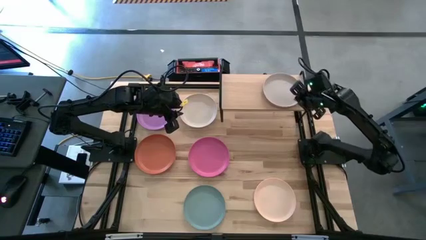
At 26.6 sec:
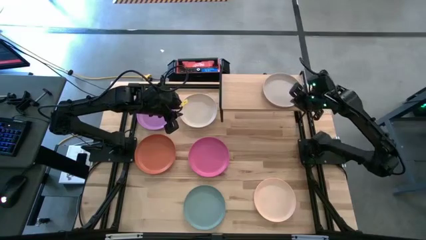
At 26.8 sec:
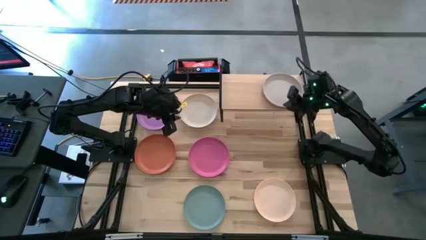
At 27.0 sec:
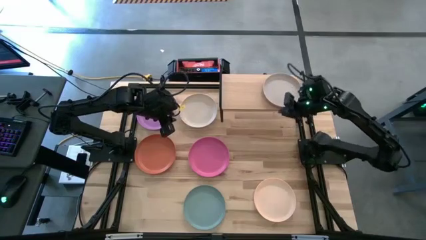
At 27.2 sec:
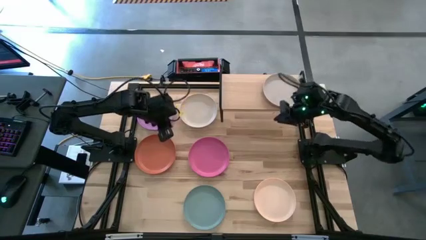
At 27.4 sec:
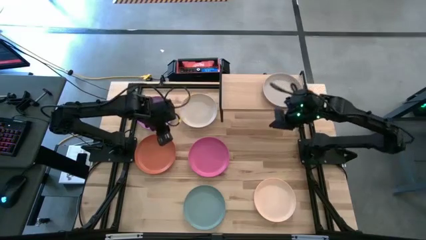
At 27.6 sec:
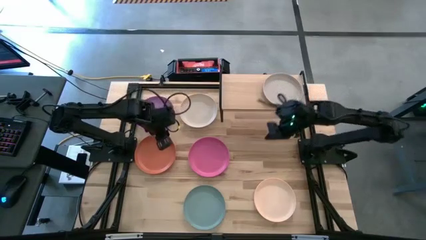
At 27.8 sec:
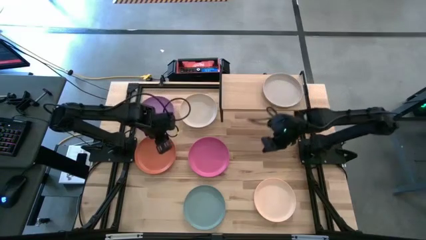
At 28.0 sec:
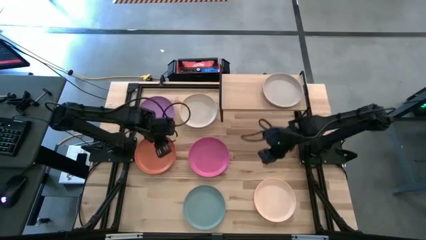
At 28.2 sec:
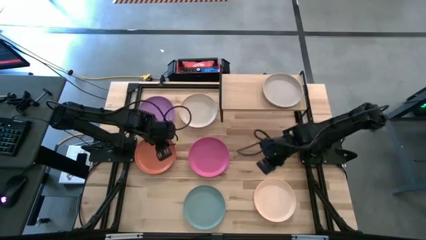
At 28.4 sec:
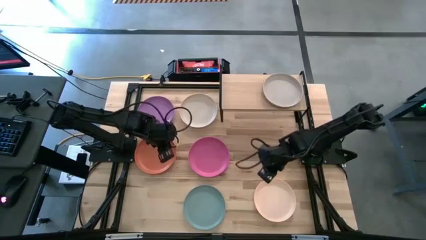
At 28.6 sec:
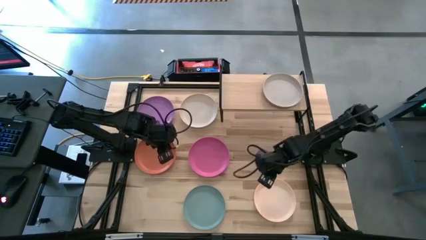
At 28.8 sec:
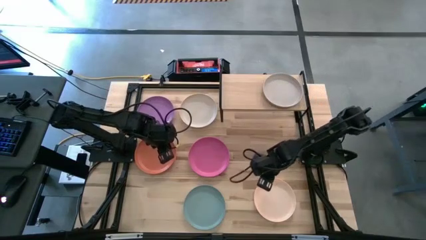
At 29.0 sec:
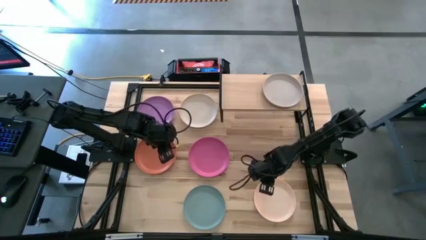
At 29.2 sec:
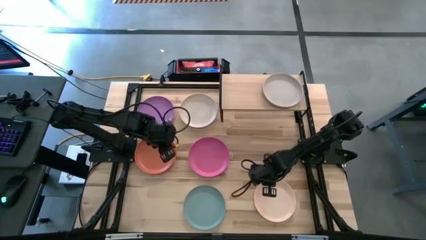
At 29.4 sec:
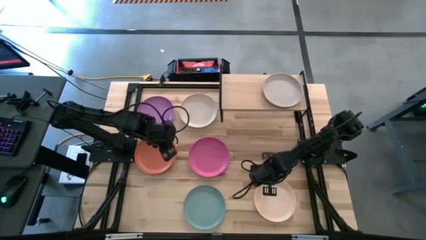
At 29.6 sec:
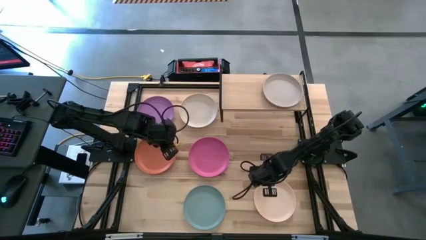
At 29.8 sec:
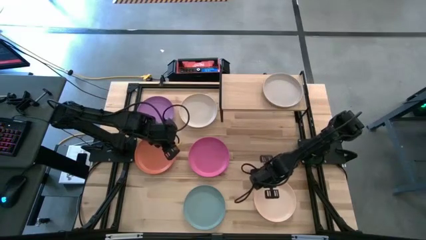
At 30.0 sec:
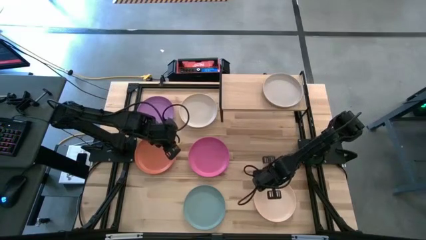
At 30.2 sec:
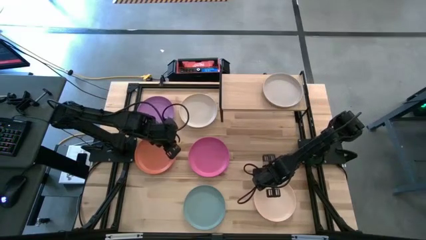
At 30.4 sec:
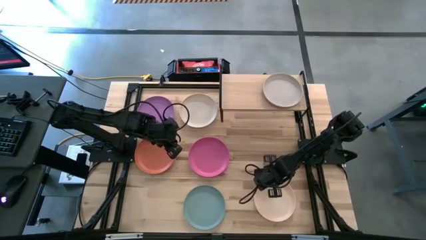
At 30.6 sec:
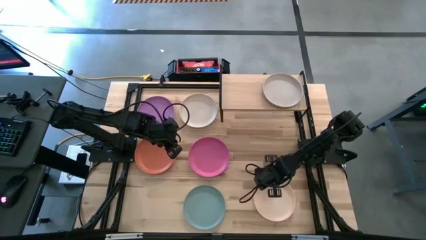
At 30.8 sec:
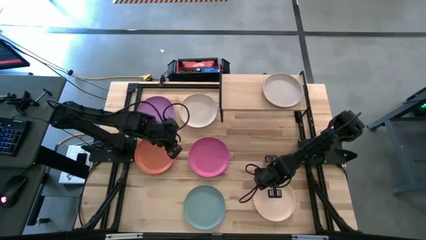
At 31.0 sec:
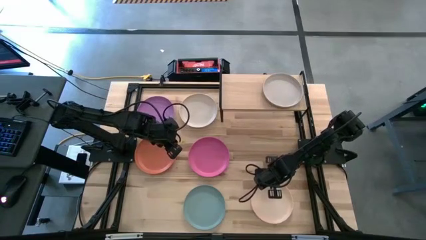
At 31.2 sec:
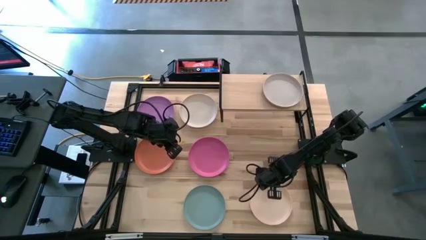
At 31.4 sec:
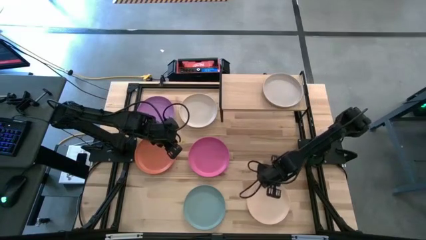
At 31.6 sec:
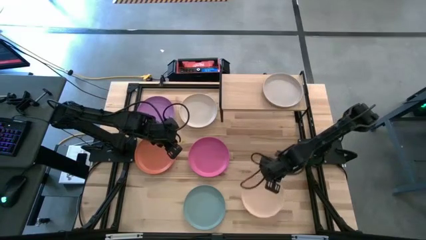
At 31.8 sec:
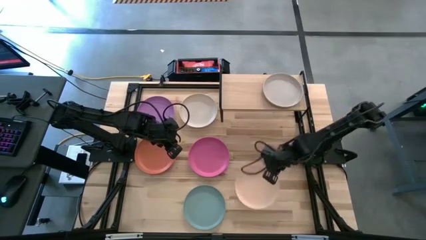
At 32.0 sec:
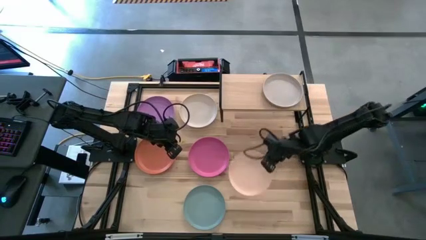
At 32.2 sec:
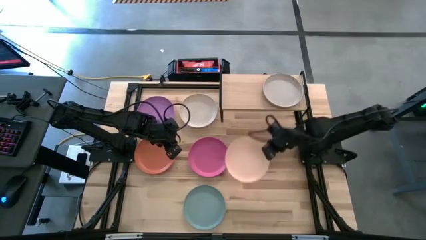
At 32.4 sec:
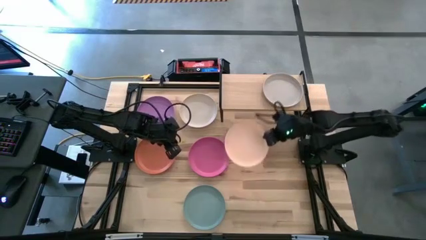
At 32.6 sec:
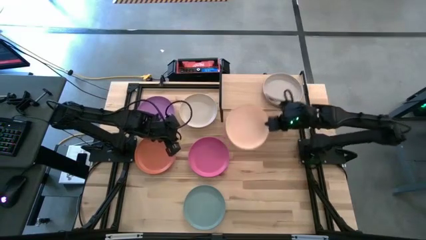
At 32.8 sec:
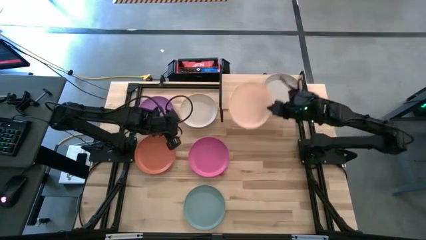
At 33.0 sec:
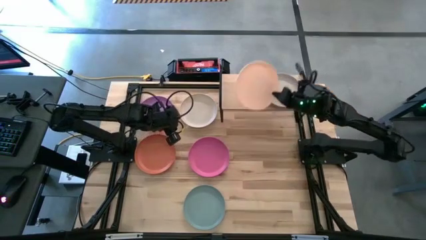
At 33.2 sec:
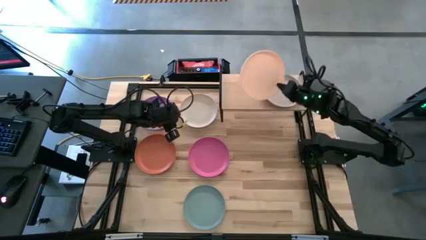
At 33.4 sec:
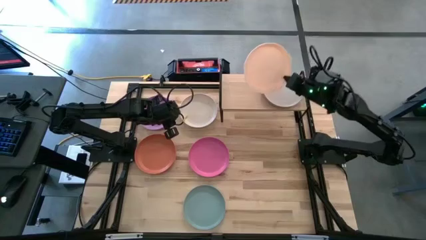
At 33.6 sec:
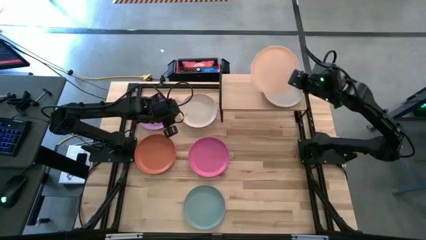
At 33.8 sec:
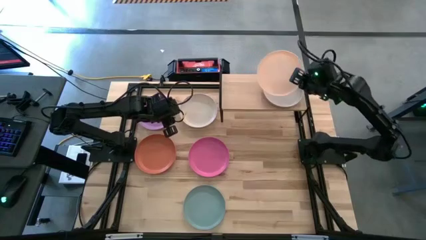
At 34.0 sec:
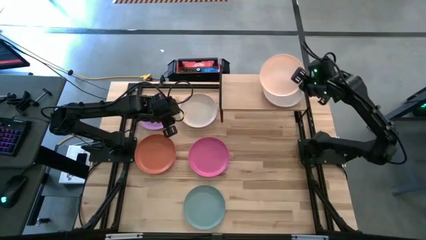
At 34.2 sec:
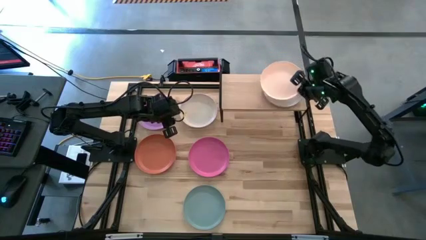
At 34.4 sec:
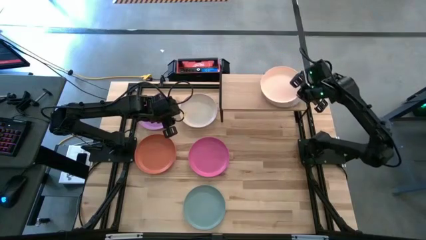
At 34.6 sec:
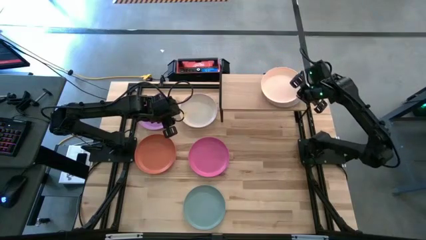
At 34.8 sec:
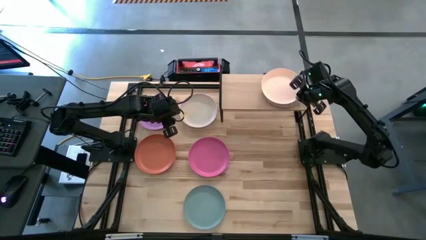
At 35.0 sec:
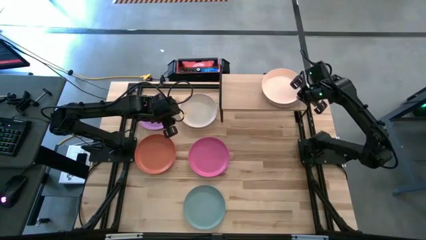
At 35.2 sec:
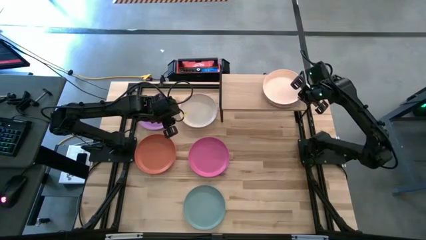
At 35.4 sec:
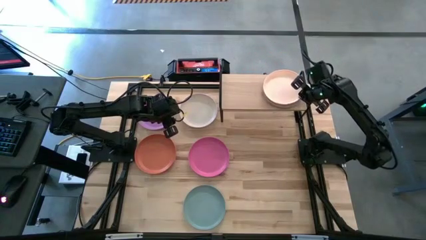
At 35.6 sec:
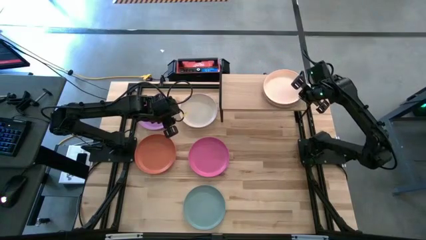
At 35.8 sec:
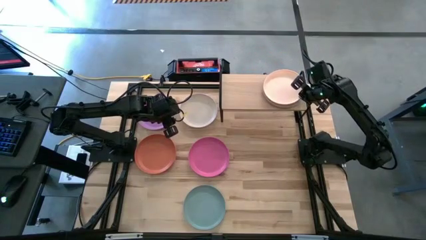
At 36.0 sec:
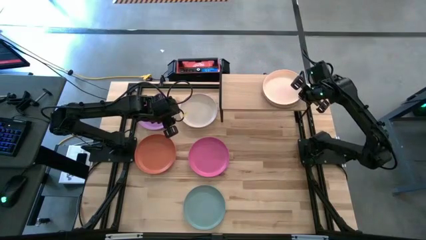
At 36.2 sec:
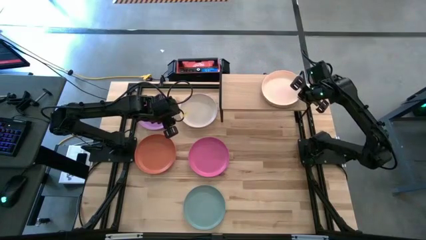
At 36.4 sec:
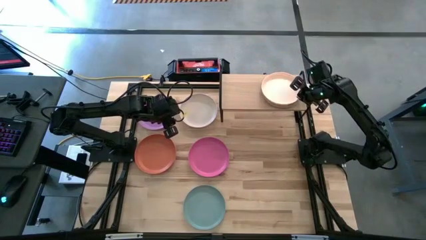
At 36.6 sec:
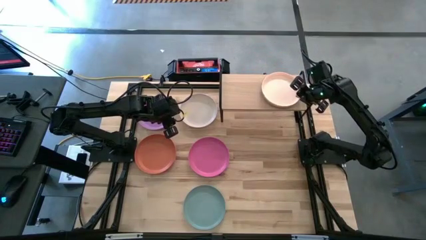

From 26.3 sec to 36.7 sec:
Task: Place and stack plates onto a shelf
Stack the bottom white plate on top of the gray plate on the shelf

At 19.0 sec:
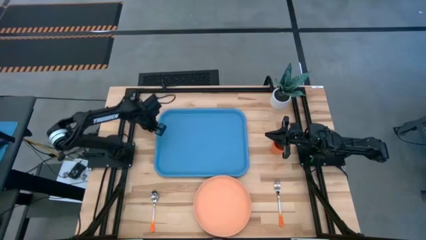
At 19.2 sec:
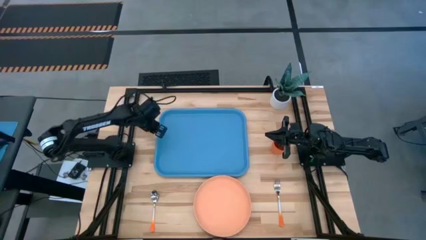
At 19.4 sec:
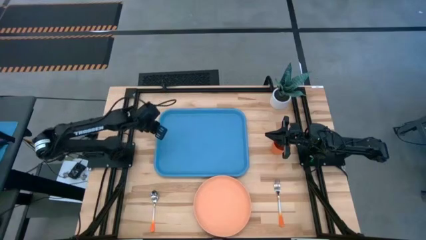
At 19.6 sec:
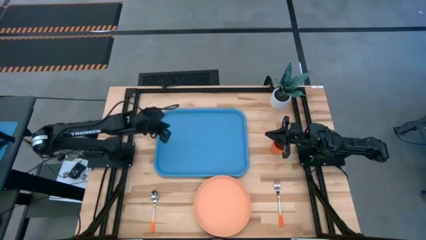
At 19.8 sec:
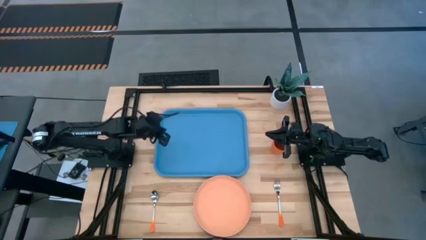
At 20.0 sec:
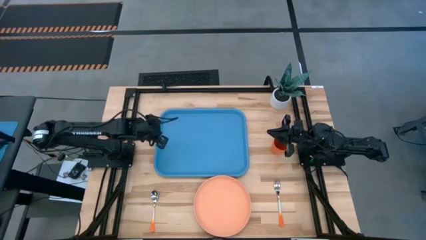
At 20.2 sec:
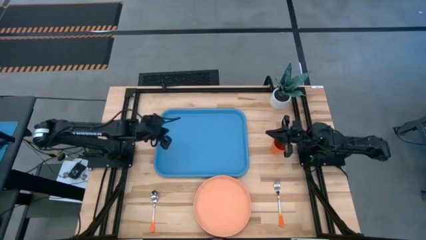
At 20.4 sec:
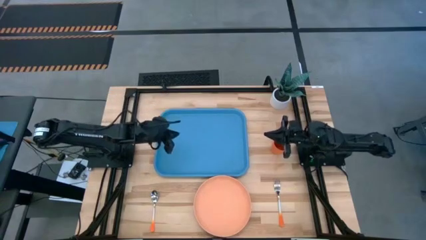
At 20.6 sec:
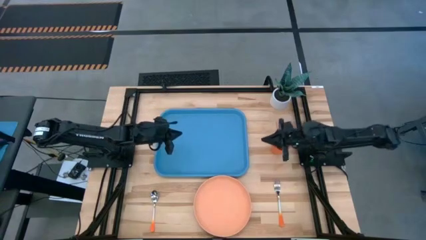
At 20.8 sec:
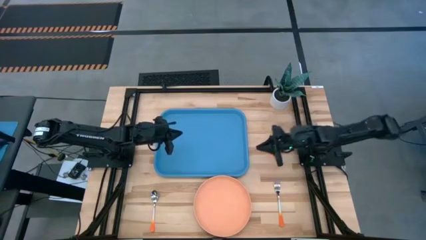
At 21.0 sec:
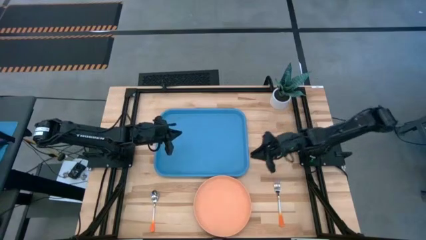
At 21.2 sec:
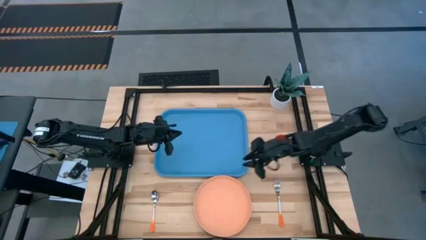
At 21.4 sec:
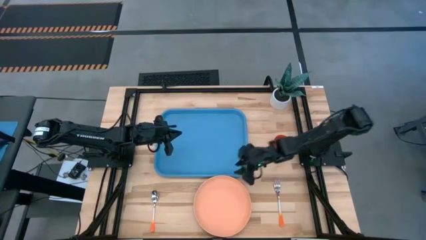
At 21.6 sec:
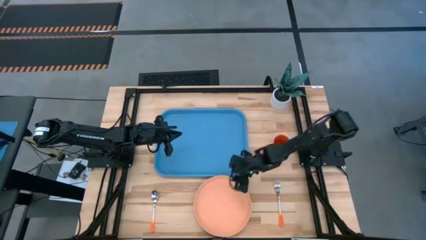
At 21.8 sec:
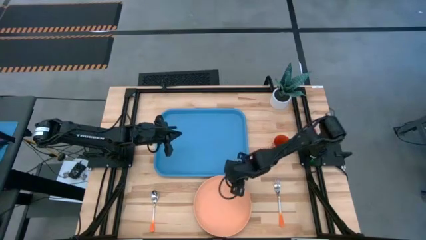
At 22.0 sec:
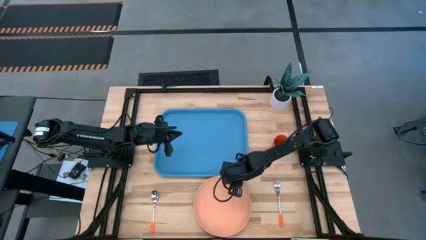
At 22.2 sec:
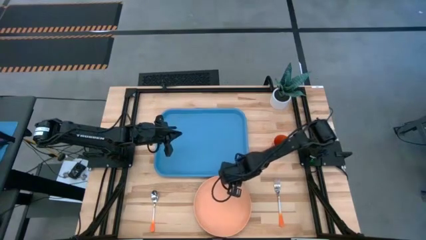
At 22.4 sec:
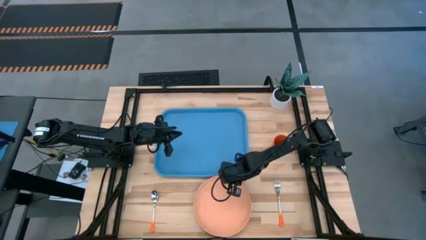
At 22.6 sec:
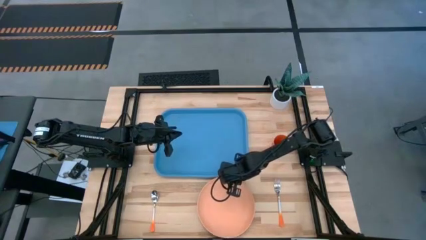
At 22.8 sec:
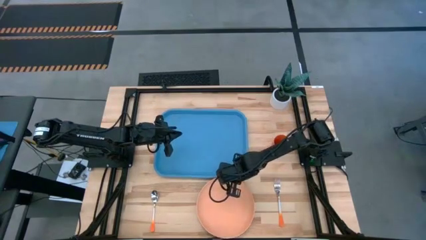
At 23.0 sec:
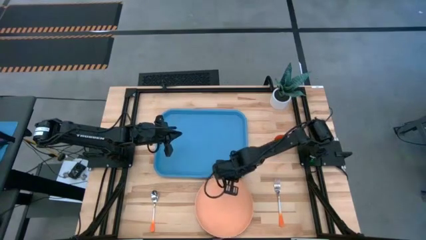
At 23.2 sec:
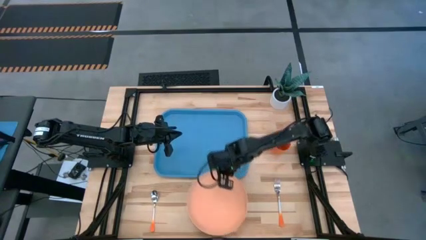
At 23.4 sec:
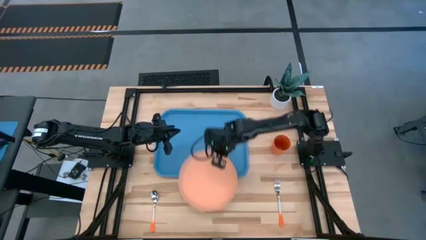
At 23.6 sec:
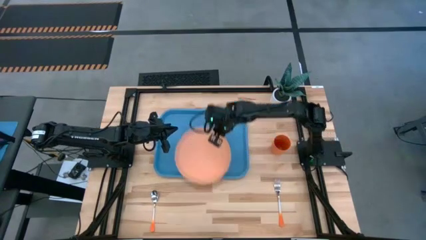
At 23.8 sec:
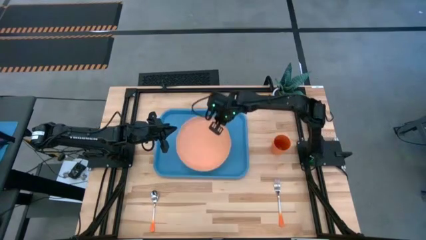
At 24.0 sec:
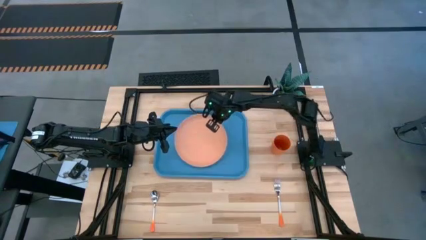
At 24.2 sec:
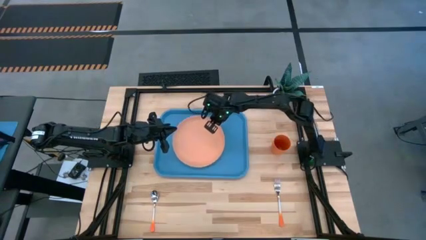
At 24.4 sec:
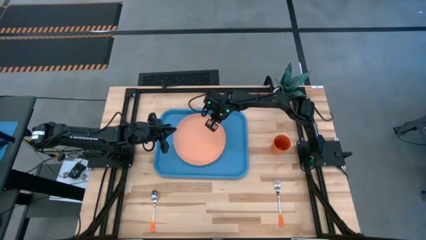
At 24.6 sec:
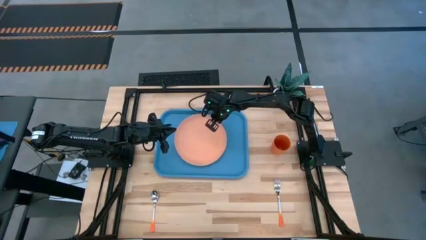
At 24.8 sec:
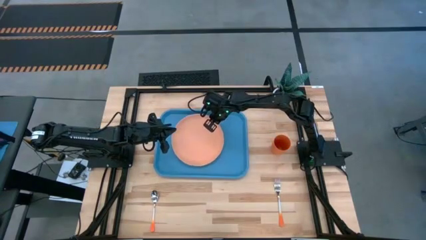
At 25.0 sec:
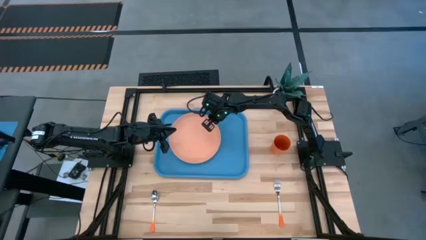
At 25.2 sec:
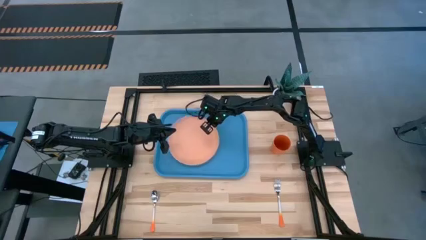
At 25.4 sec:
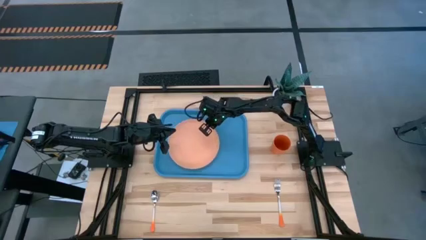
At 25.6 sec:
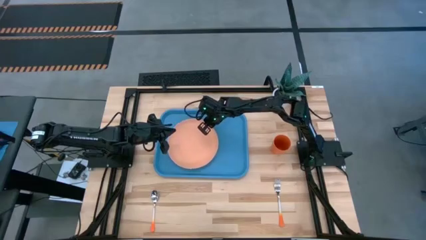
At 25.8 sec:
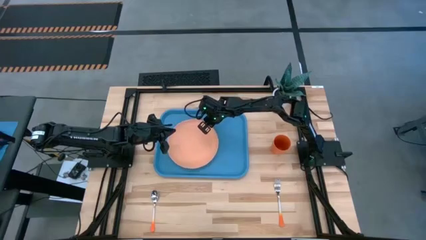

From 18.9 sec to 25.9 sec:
Task: Pick and place plate/cup/fork/spoon on tray
Put the orange plate on the center of the blue tray
